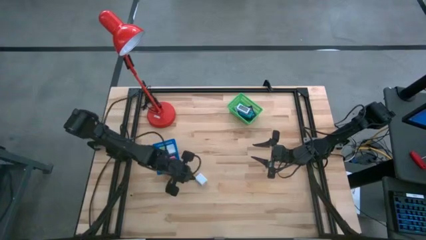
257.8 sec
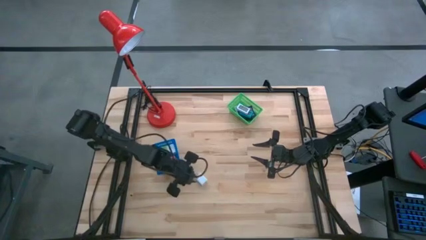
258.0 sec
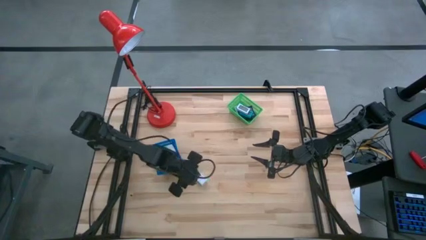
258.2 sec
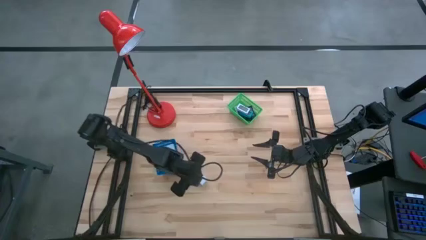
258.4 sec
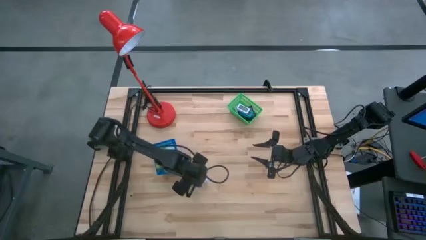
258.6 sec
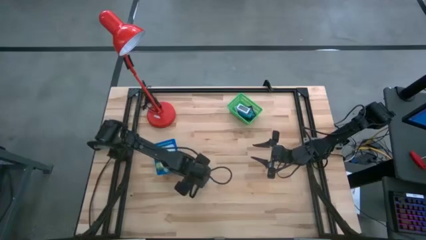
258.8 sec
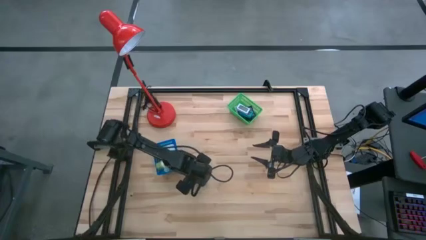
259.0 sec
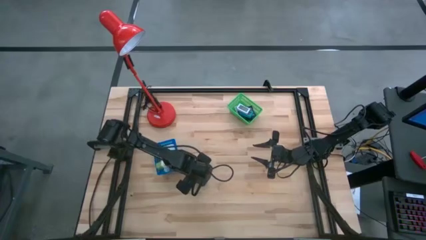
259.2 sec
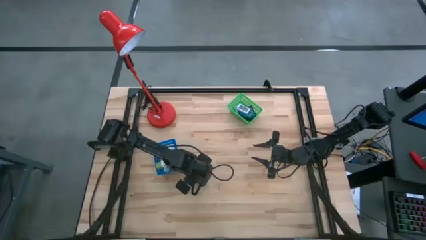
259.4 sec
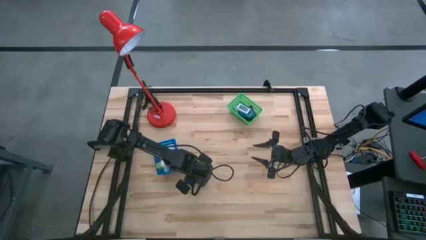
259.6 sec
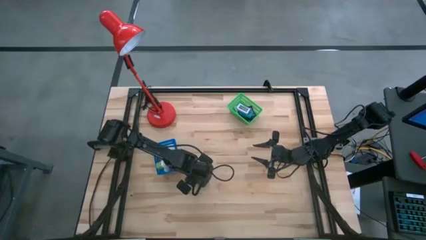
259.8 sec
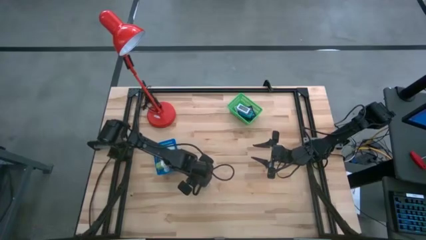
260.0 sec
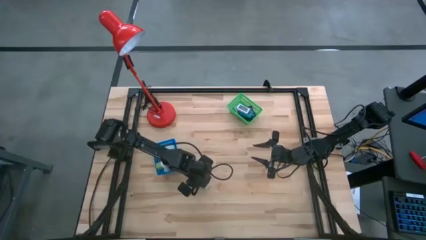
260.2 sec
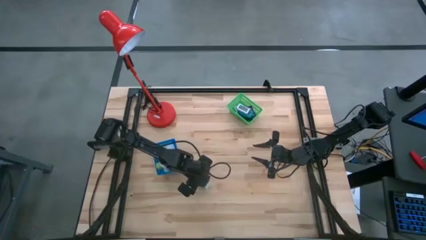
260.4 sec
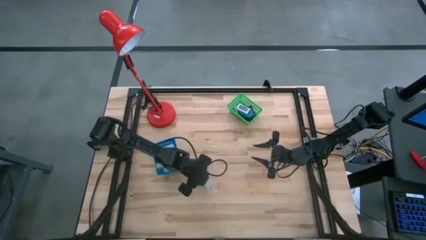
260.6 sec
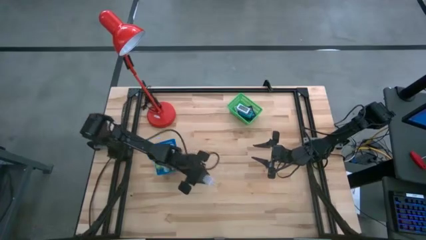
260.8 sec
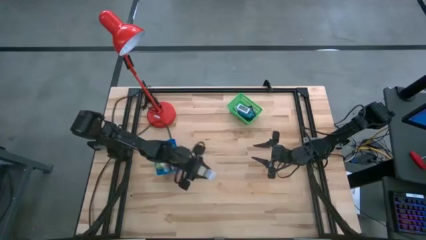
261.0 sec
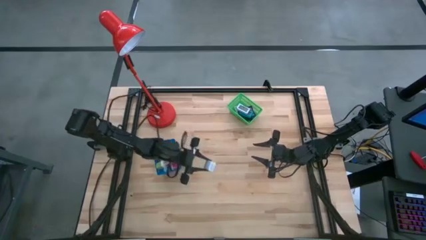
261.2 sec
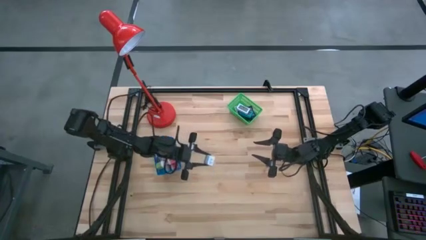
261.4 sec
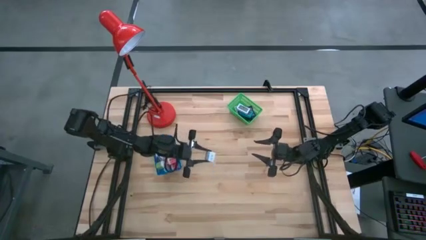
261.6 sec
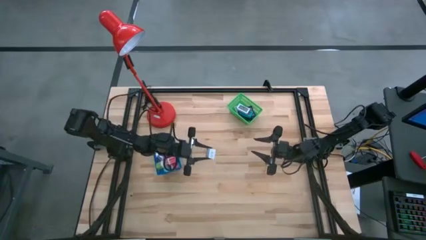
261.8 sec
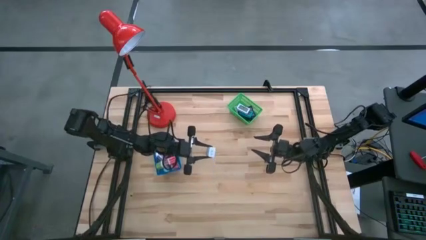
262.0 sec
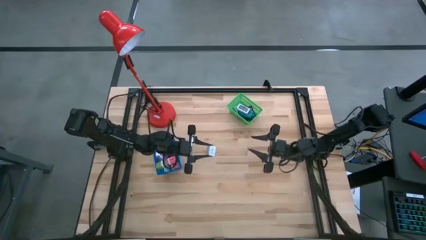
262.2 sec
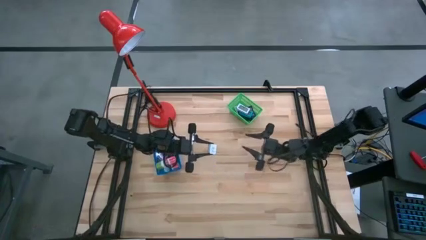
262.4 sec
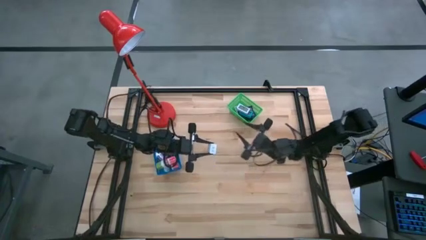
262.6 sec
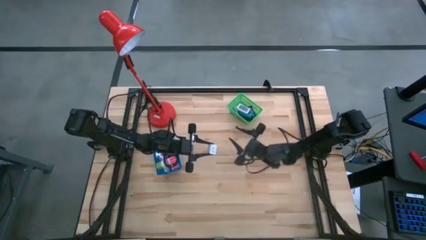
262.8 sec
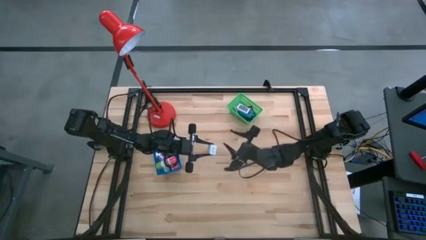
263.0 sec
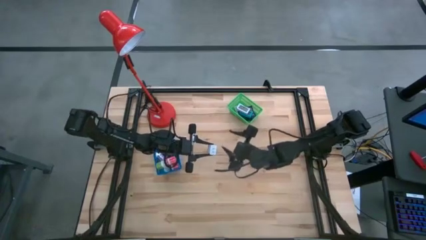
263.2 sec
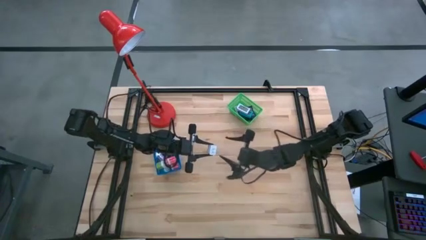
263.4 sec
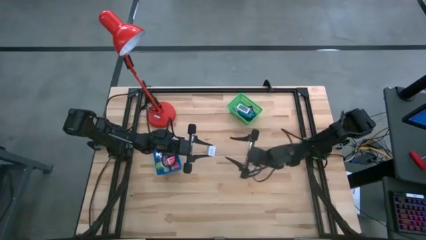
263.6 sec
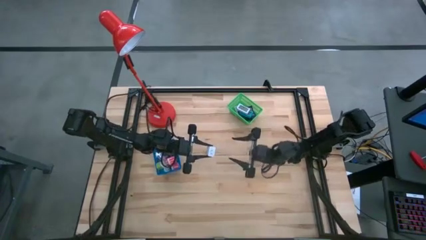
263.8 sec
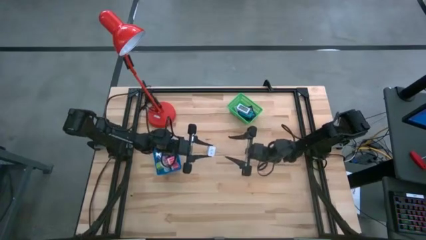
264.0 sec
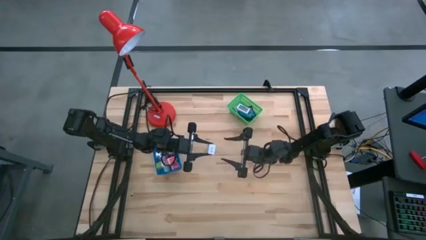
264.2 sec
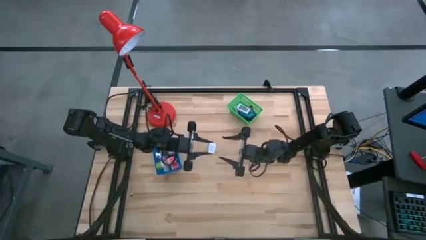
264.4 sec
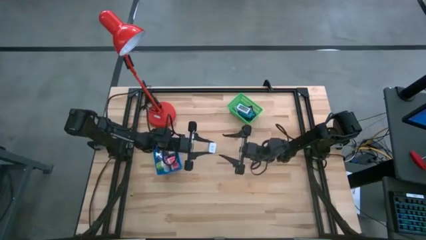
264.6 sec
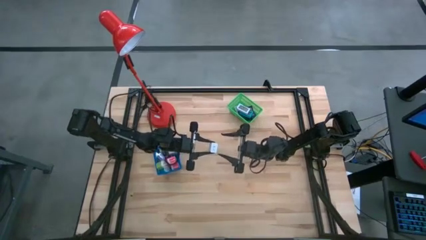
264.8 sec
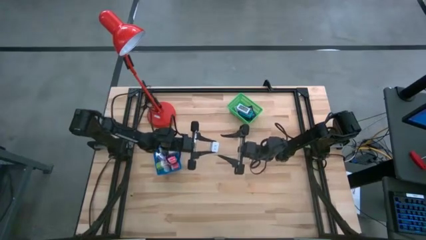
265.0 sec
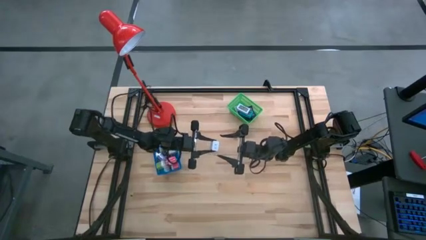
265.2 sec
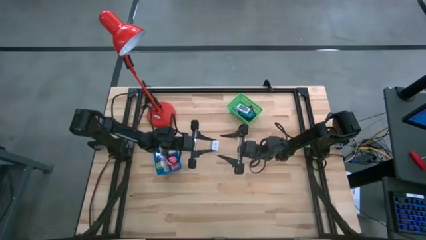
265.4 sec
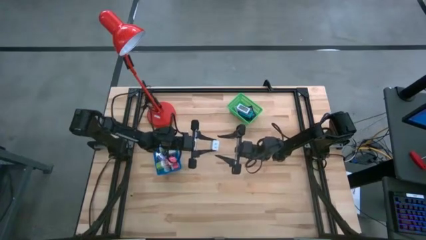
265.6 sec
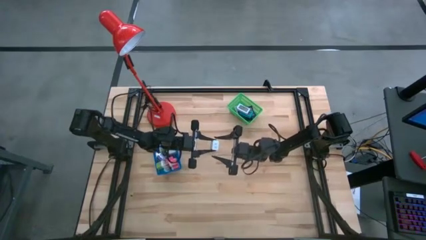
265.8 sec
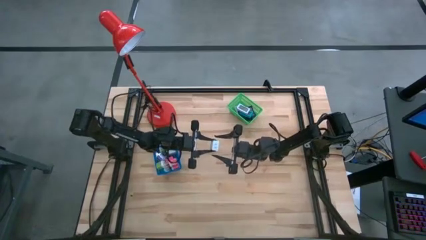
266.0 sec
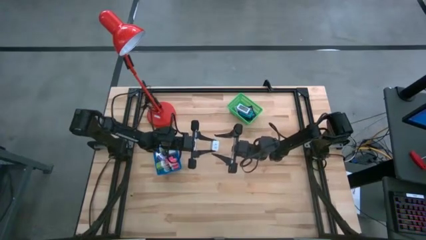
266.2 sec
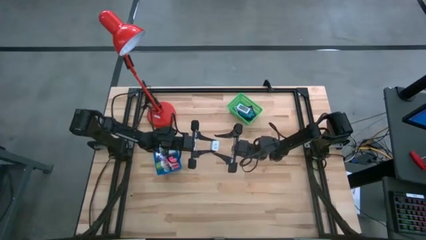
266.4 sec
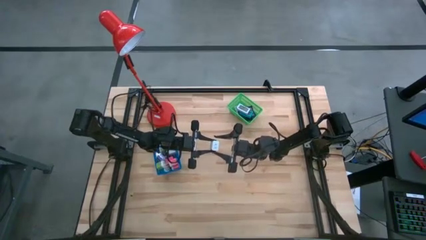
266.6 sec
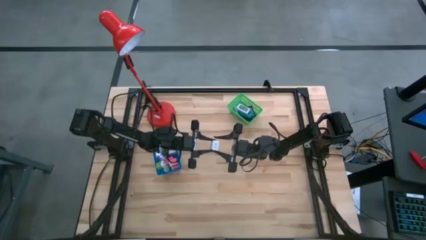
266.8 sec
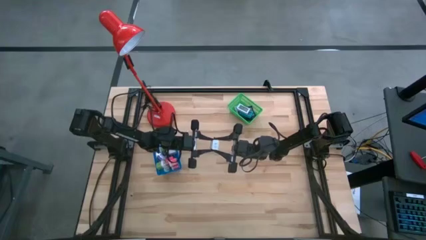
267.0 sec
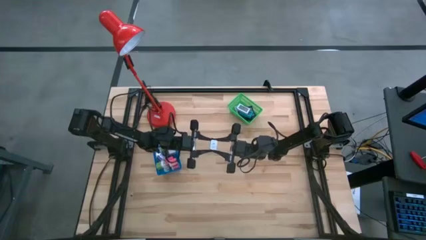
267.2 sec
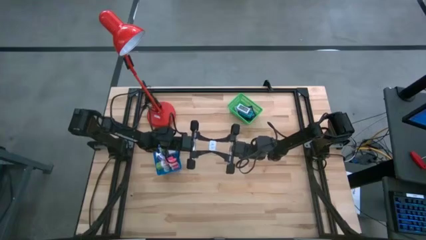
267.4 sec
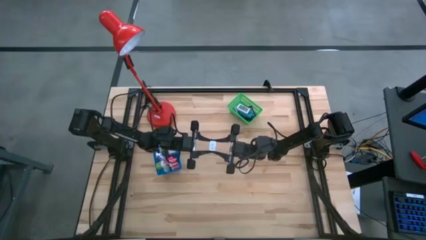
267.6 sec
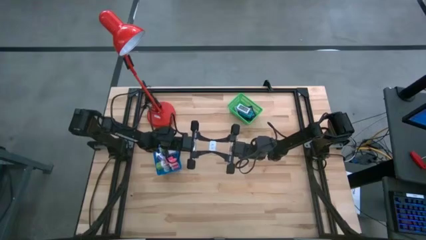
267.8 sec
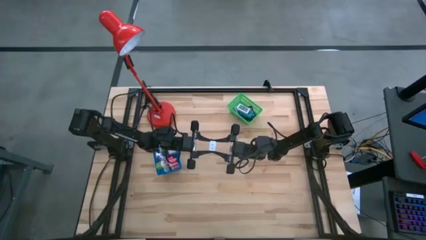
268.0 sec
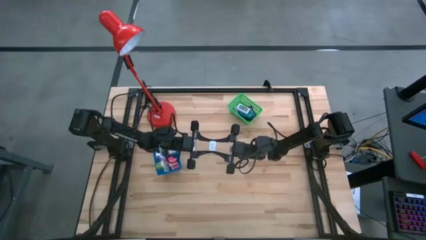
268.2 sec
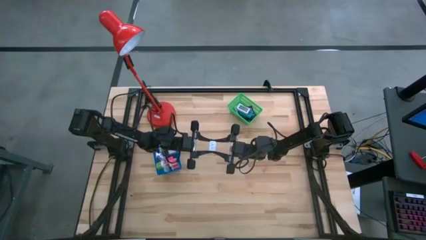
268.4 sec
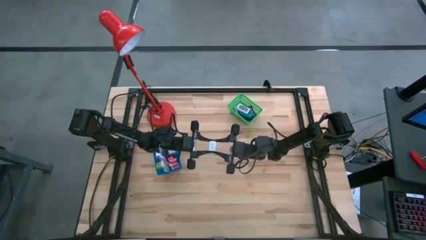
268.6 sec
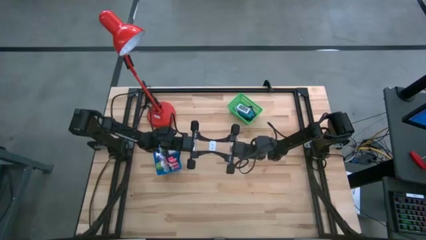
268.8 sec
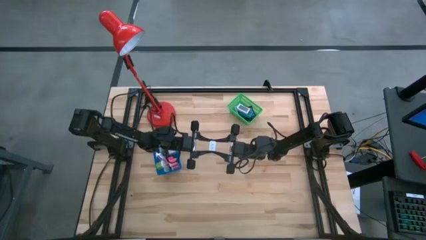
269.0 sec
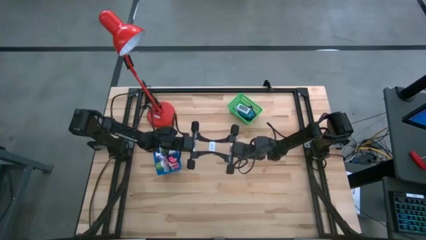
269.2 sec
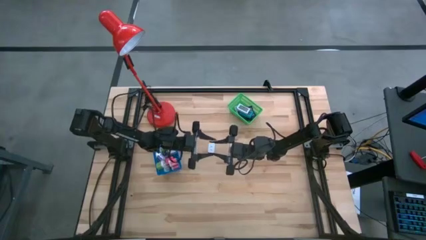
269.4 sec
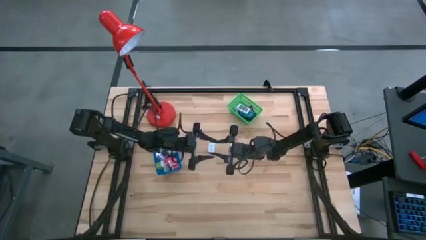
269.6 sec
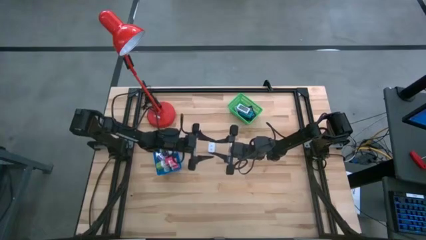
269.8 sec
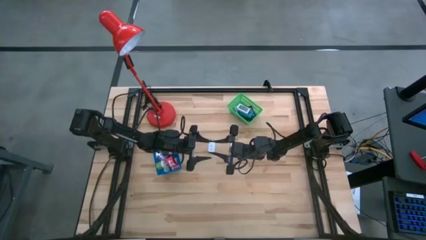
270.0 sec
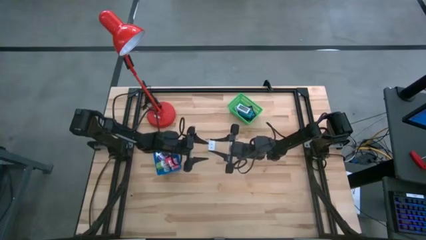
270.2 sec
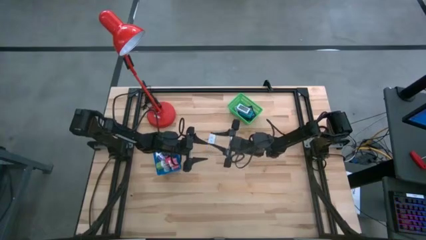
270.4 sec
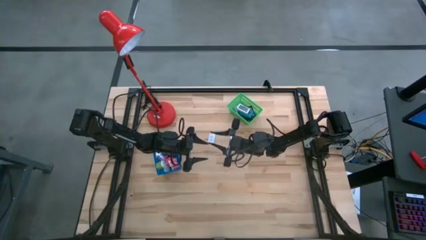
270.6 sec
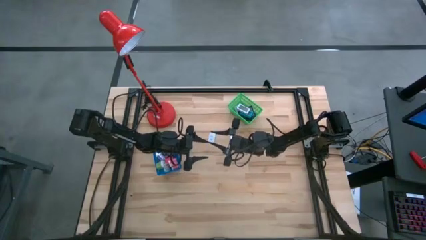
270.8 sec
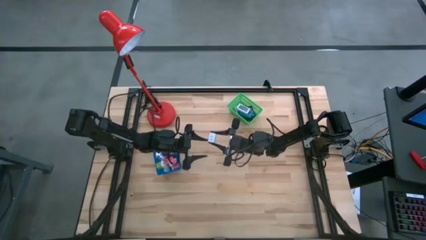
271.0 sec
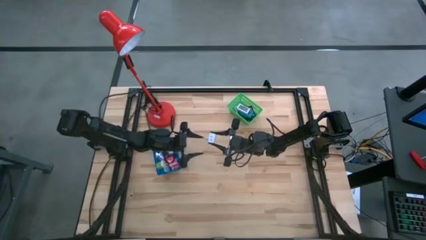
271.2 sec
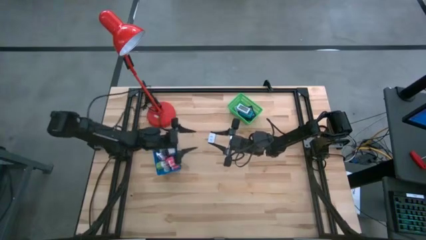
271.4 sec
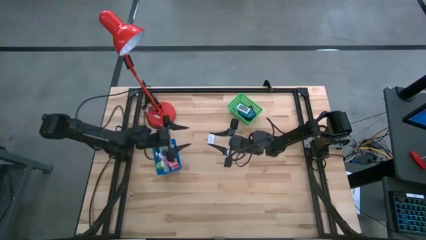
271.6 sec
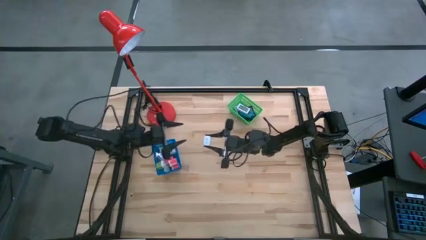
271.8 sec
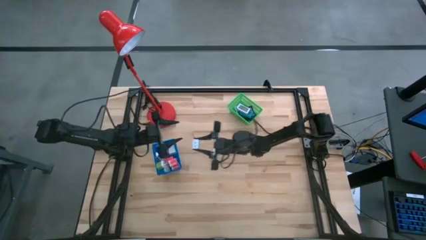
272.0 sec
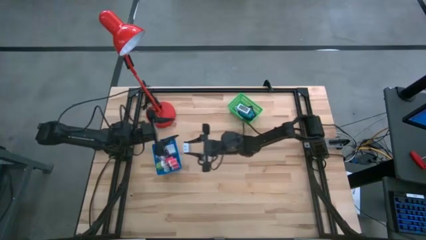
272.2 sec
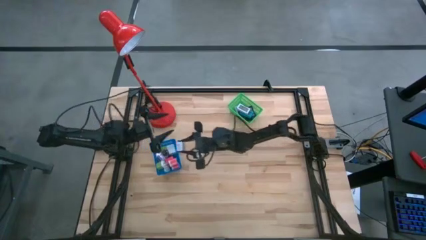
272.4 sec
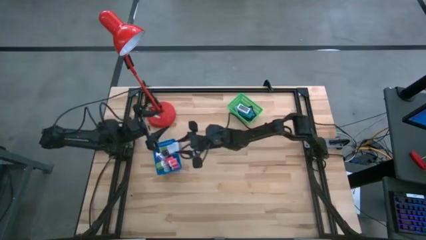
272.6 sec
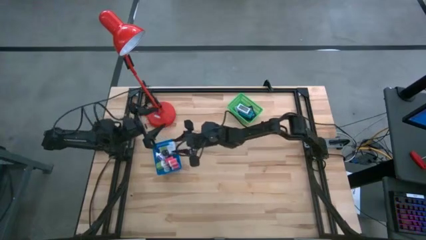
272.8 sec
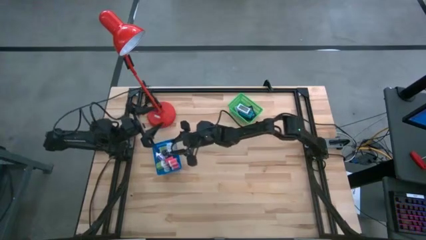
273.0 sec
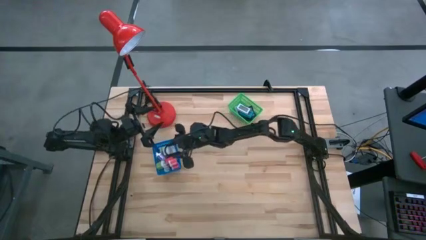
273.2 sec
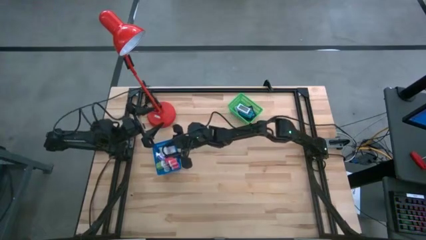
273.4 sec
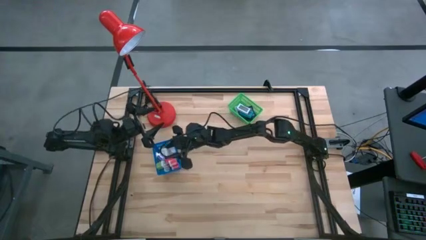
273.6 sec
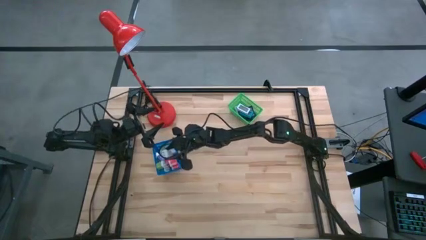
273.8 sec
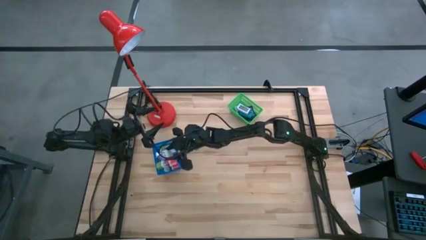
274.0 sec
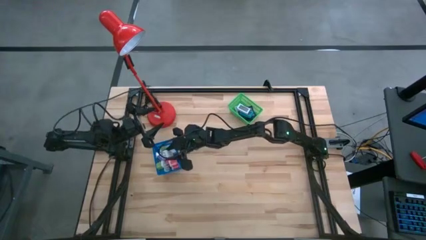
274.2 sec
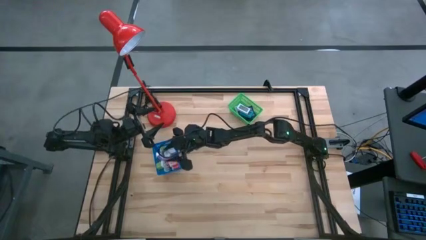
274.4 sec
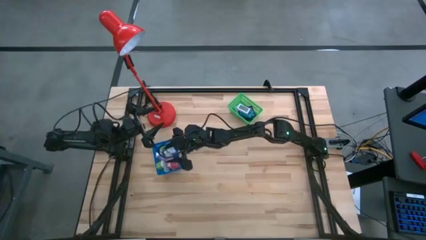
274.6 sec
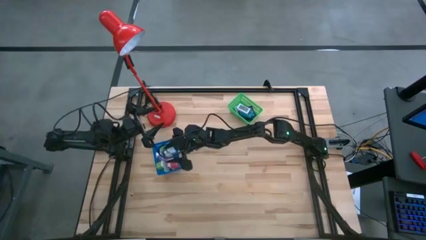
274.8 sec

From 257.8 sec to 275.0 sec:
Task: Pick & Place Office items
Put the white charger adapter into the blue basket
